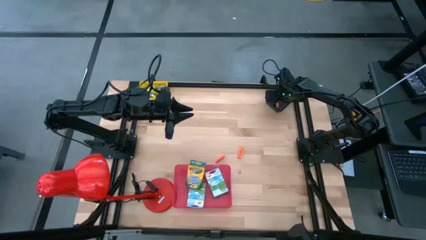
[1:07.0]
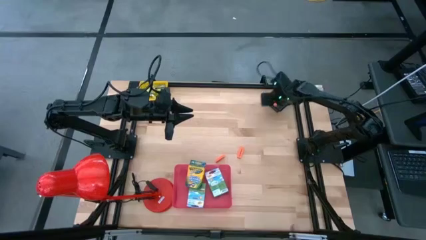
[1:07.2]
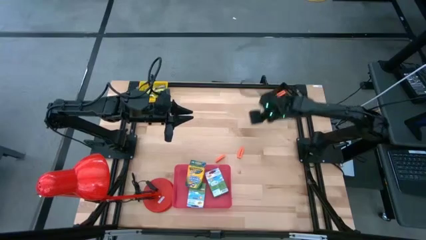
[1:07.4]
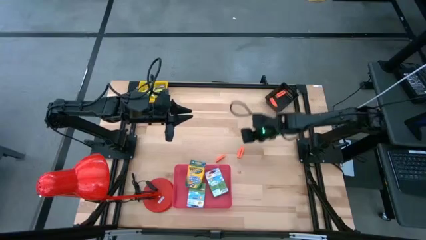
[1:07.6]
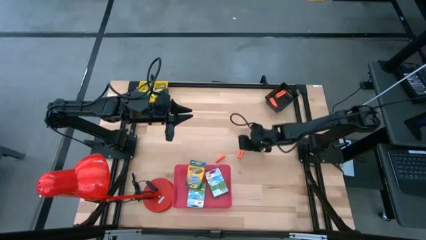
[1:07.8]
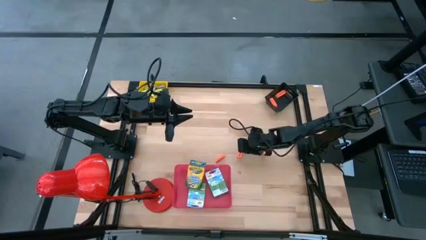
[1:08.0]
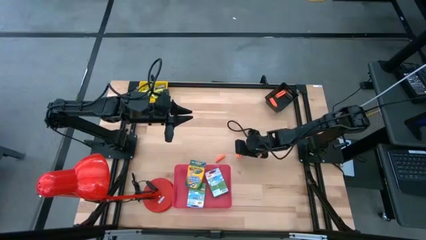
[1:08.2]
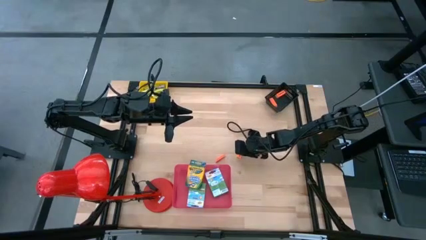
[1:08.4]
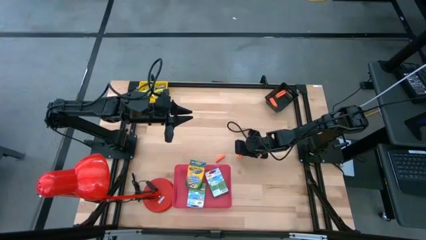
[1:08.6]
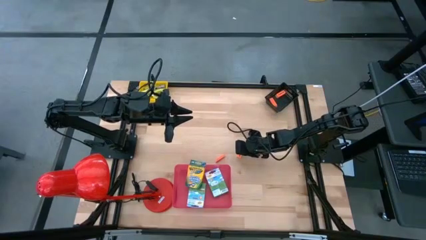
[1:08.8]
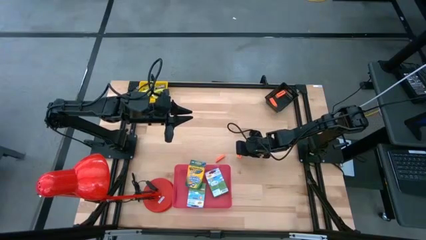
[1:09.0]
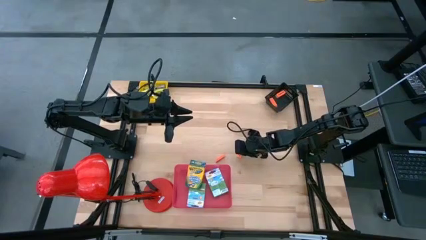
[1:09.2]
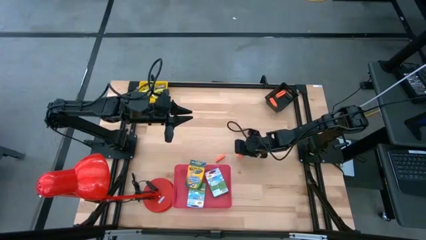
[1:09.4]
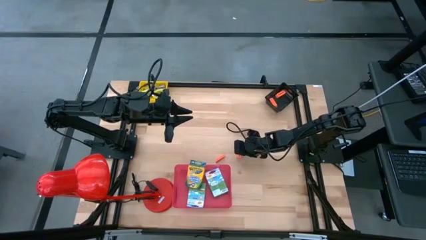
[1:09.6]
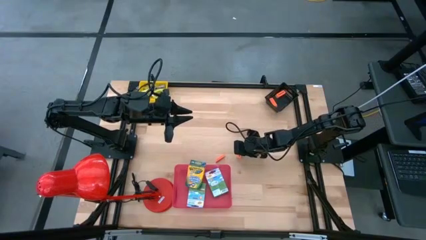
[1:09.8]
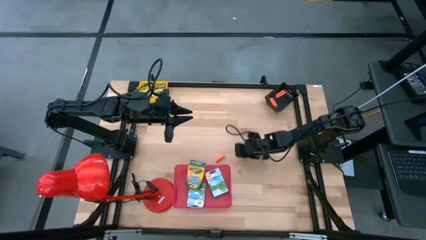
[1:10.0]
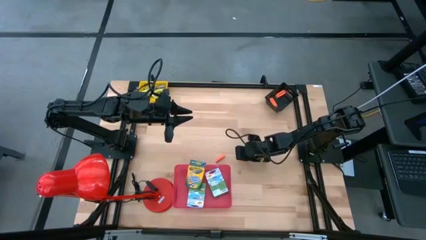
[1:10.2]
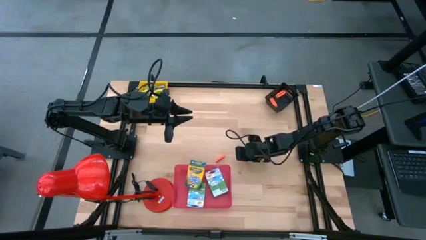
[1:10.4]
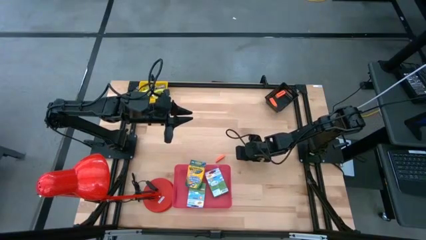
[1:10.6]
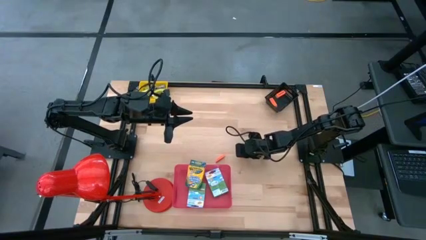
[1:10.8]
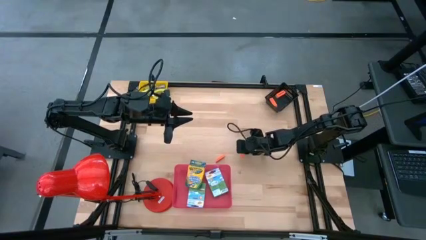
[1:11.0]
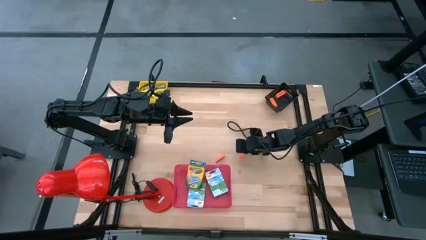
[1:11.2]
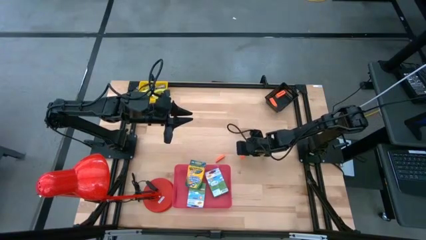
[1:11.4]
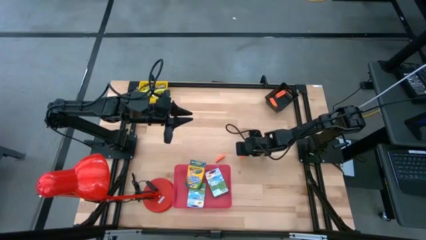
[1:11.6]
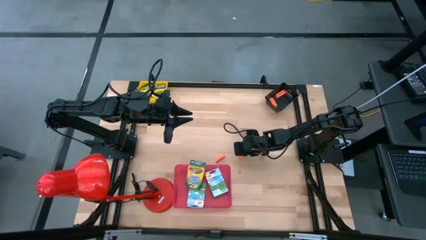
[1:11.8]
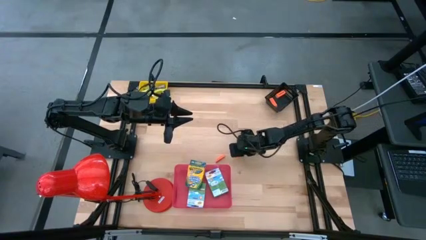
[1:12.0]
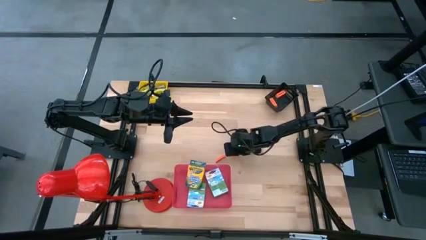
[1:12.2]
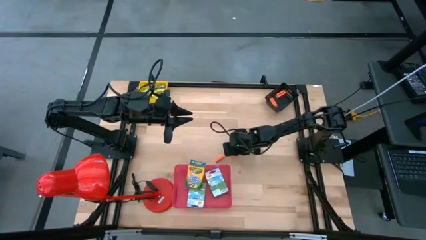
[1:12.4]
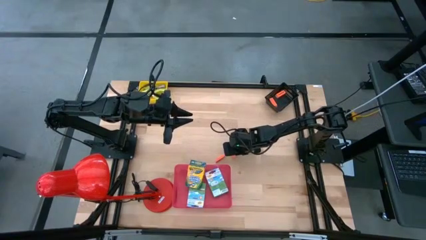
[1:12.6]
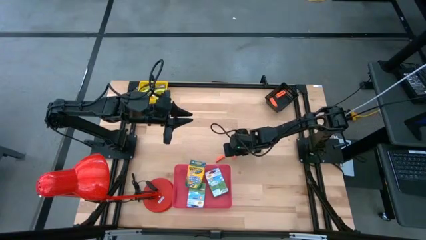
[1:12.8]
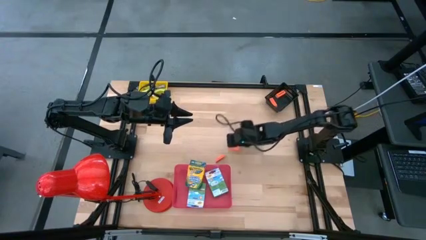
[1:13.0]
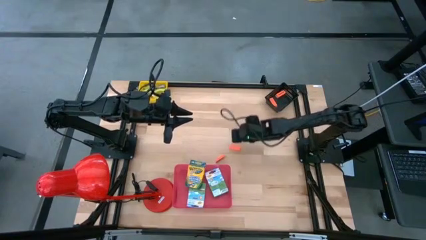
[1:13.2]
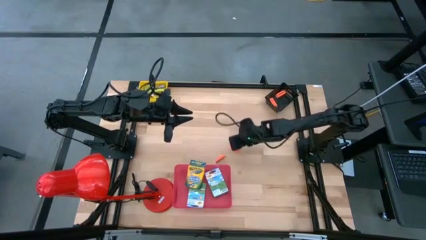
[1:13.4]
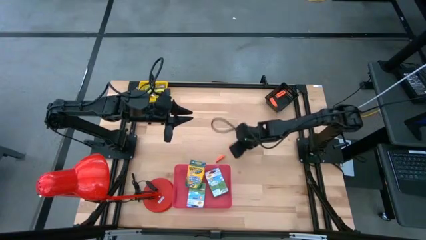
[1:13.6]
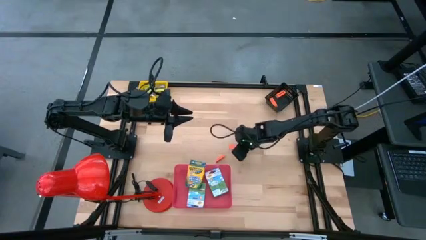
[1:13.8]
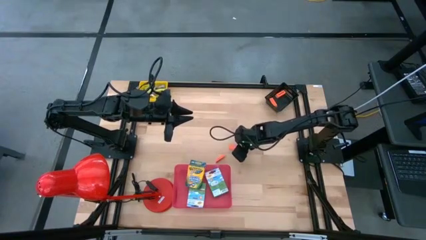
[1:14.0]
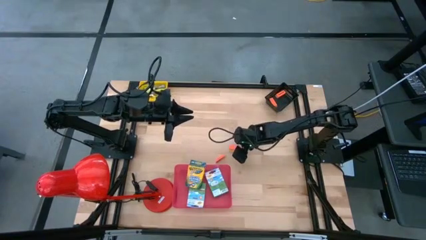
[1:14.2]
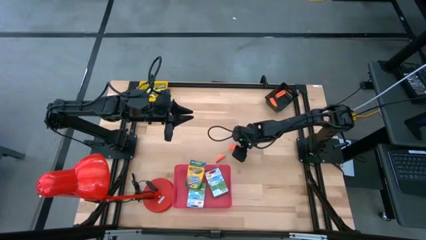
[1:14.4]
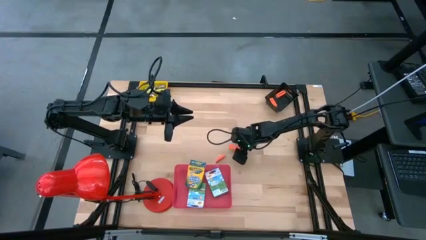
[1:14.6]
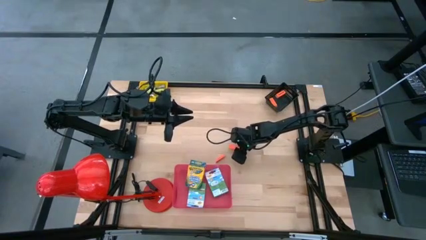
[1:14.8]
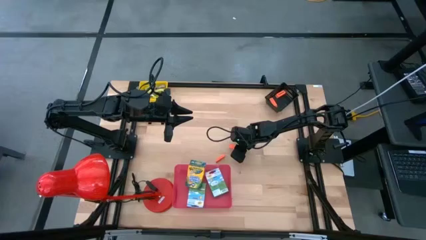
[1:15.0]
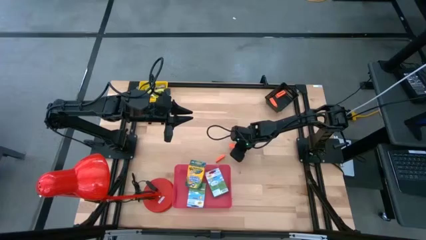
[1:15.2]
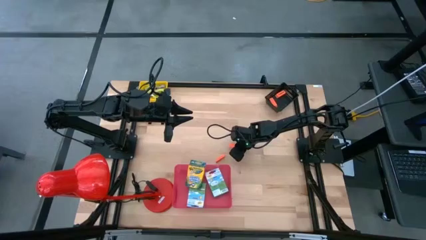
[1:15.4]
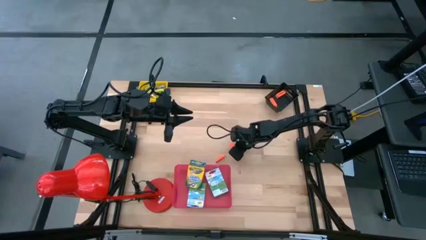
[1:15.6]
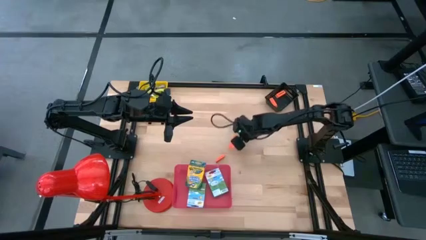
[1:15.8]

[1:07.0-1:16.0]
Task: Pick & Place School Supplies
Put the orange eraser into the black bin

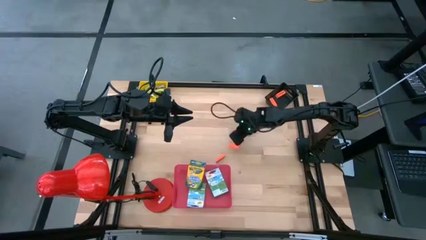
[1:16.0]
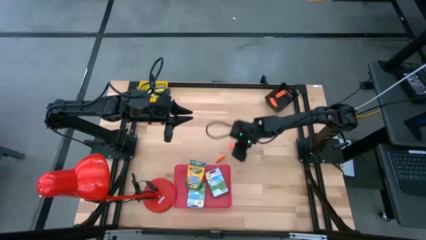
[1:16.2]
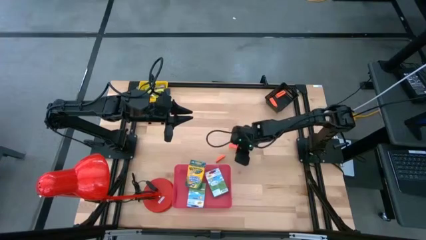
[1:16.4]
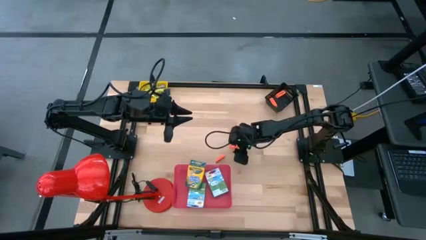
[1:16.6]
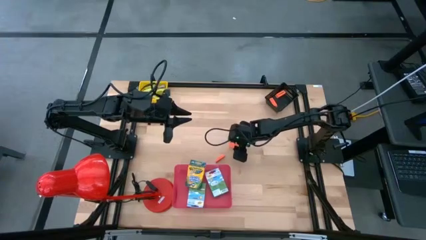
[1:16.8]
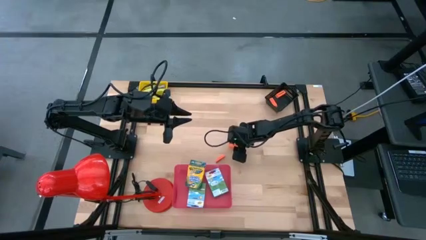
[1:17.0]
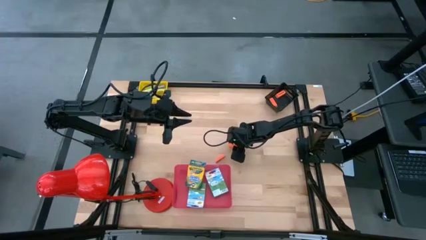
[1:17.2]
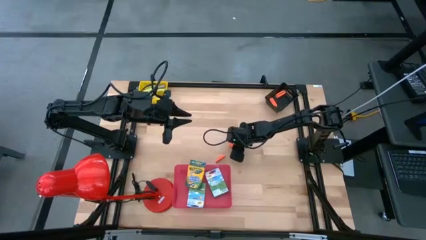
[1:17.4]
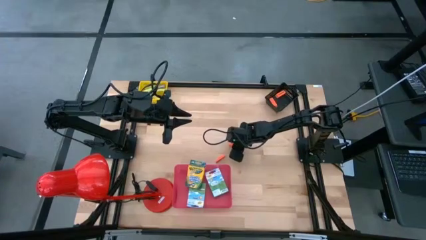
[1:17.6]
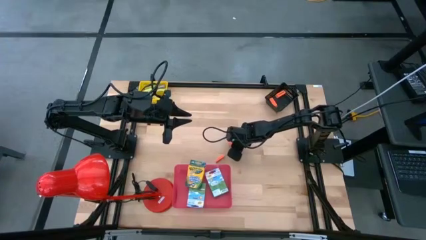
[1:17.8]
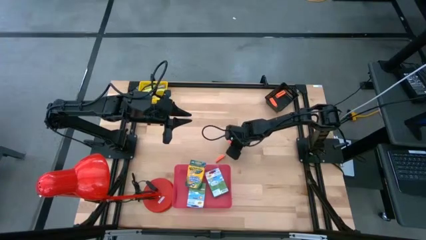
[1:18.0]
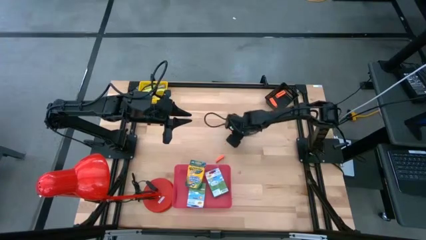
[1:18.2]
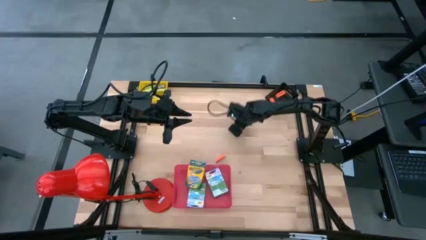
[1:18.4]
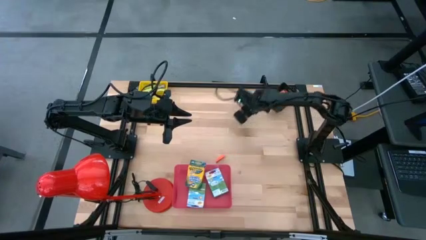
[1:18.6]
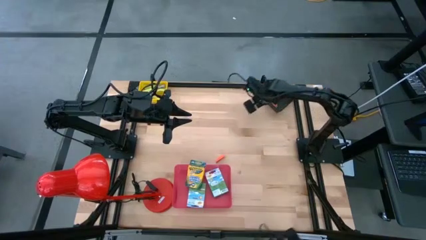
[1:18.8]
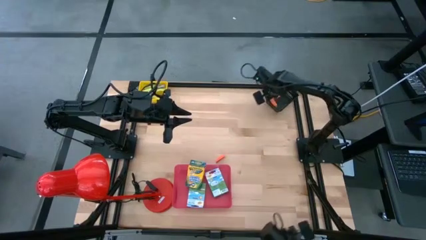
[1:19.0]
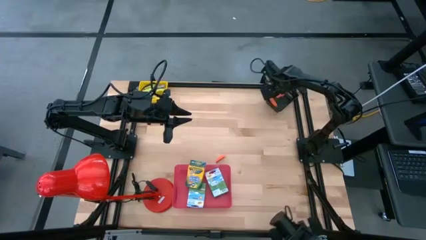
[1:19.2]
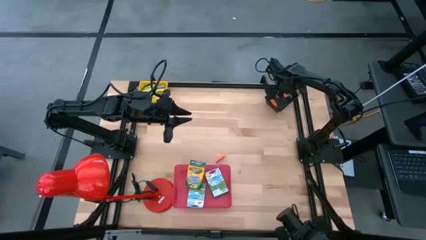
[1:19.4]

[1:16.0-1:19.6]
Put the orange eraser into the black bin

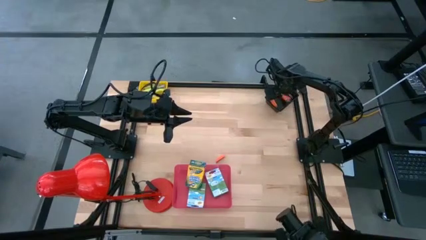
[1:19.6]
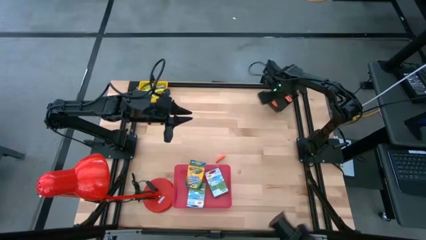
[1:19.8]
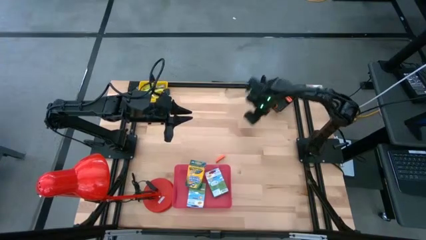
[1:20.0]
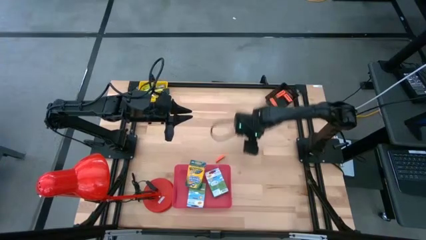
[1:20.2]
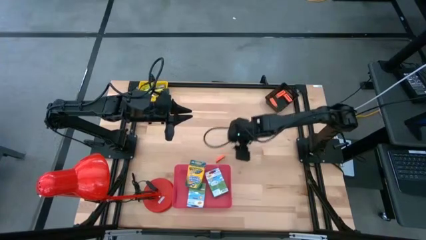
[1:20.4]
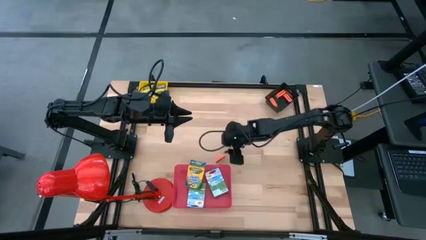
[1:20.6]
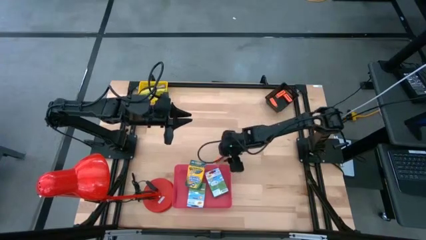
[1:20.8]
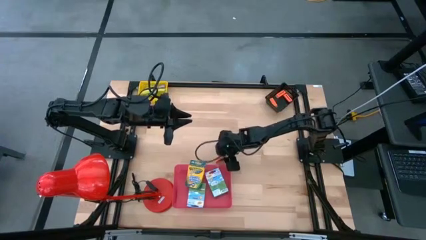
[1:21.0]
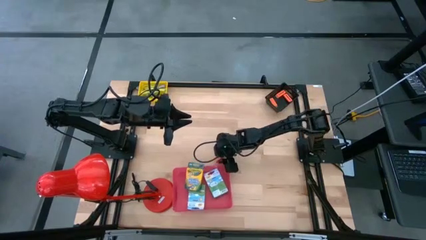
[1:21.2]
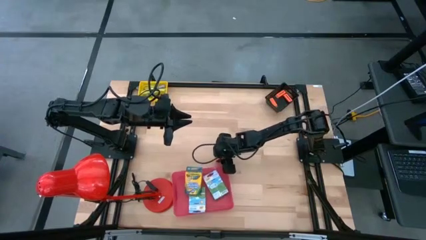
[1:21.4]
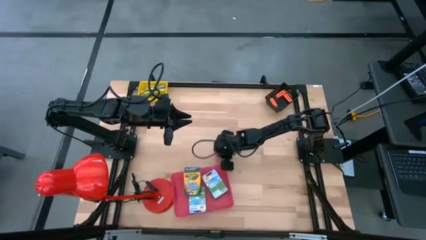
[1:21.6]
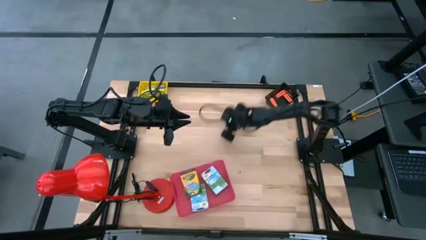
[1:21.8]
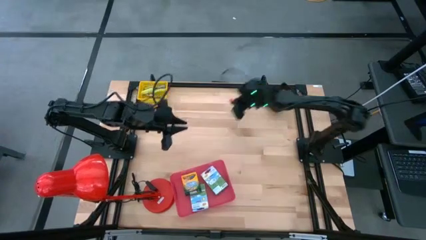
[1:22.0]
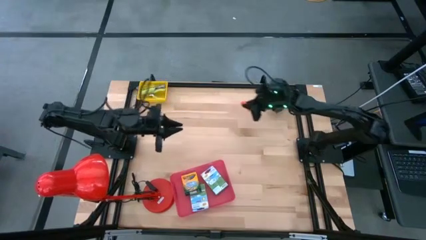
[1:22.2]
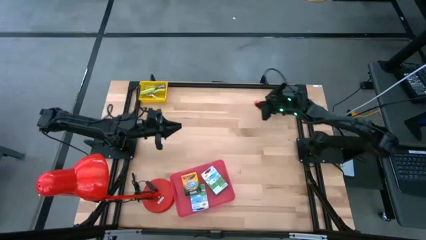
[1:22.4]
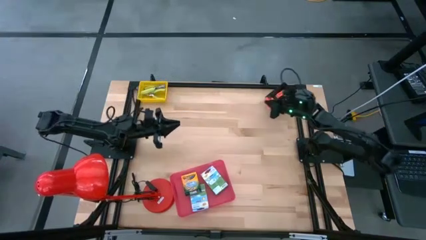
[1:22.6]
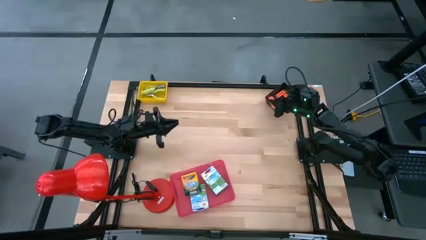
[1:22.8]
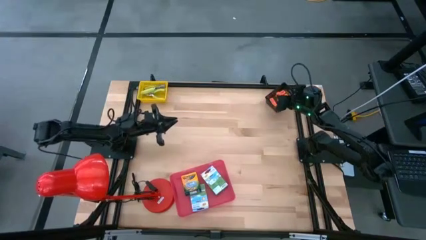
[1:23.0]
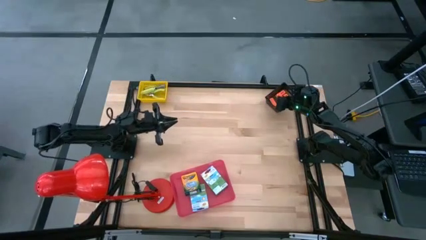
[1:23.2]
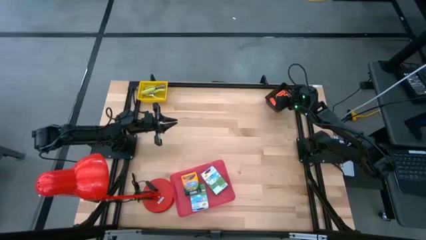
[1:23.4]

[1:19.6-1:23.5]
Put the orange eraser into the black bin
